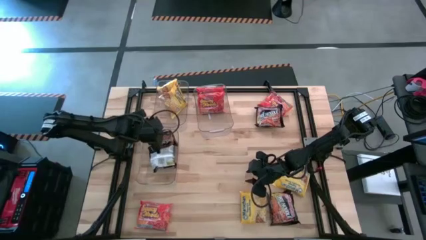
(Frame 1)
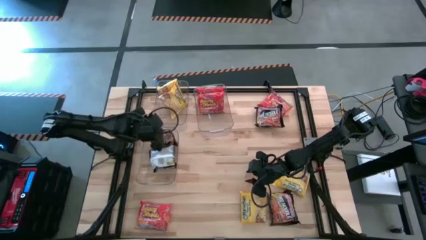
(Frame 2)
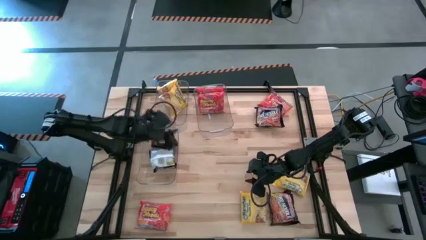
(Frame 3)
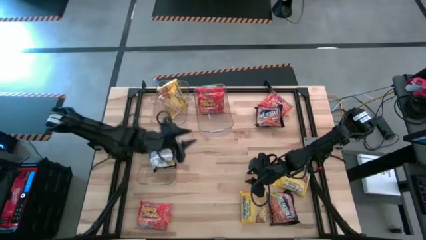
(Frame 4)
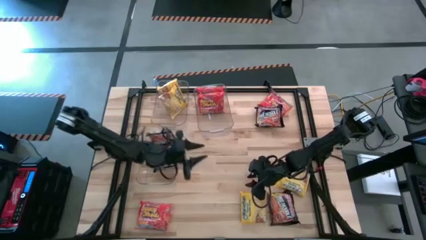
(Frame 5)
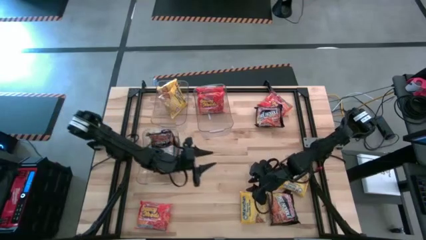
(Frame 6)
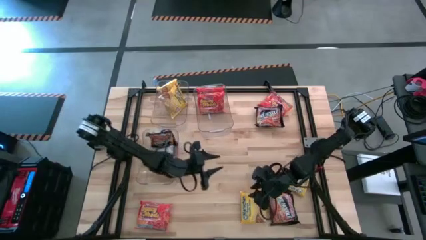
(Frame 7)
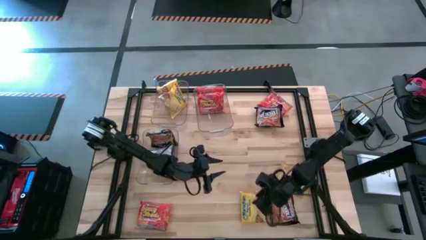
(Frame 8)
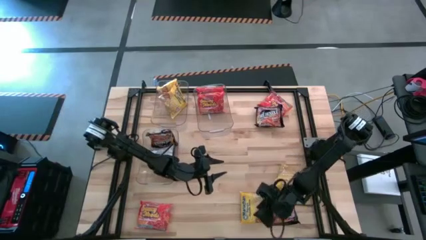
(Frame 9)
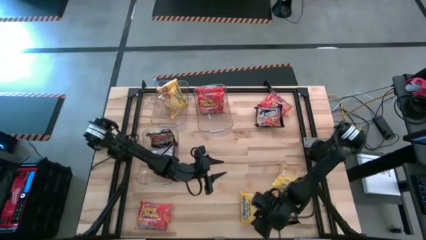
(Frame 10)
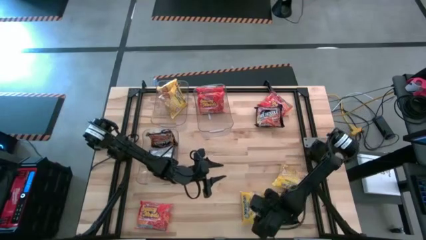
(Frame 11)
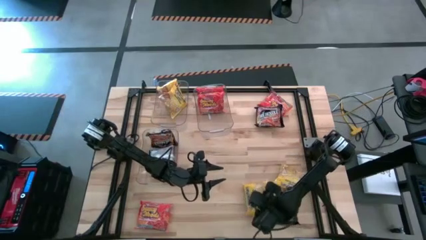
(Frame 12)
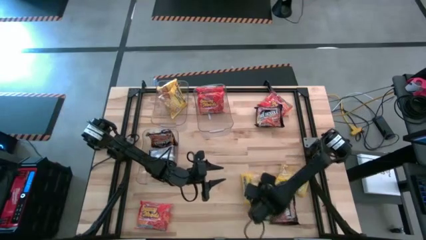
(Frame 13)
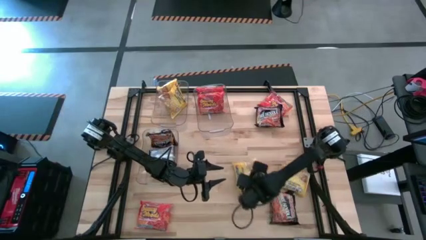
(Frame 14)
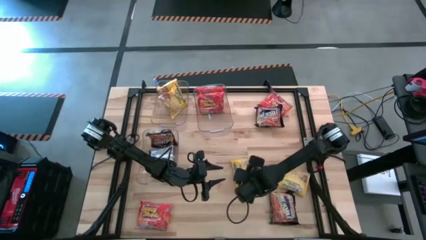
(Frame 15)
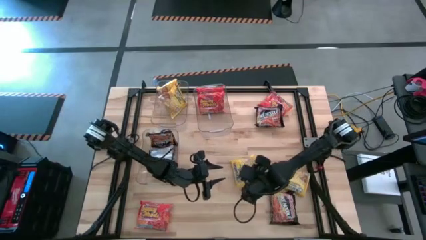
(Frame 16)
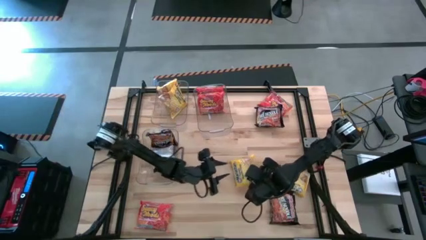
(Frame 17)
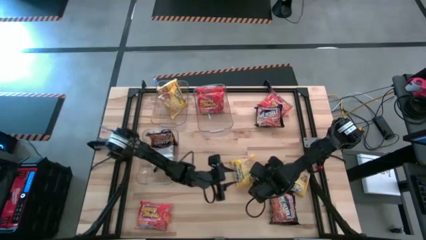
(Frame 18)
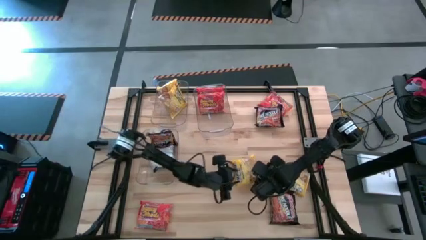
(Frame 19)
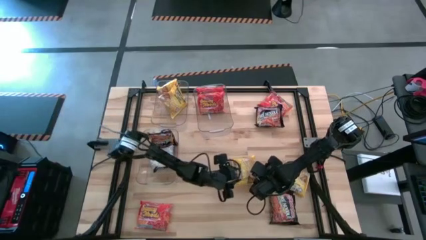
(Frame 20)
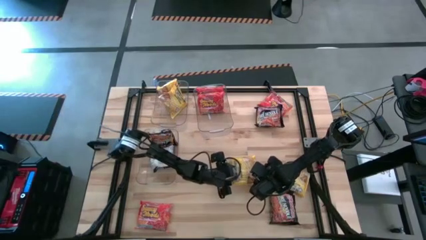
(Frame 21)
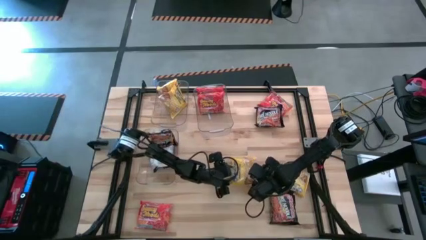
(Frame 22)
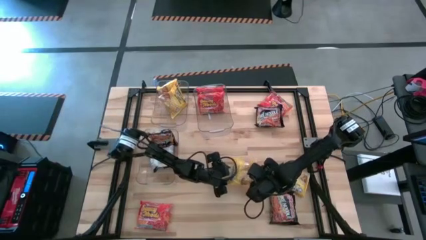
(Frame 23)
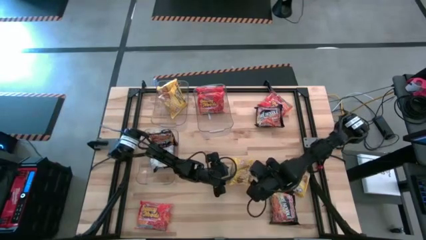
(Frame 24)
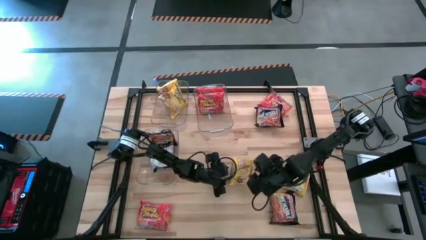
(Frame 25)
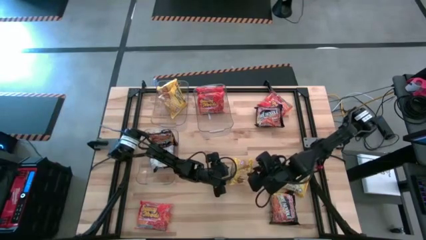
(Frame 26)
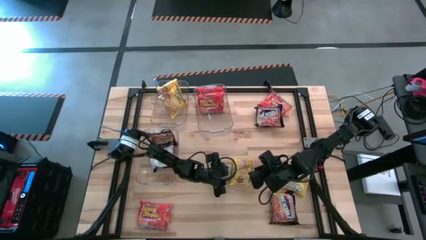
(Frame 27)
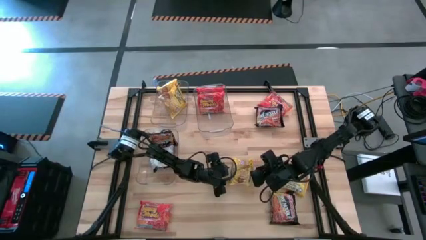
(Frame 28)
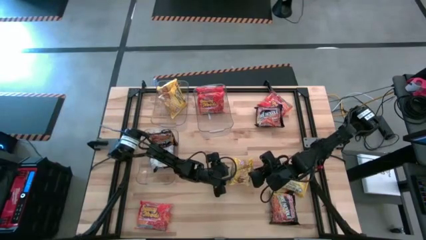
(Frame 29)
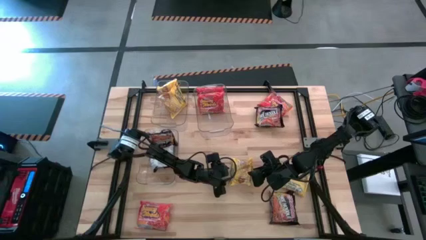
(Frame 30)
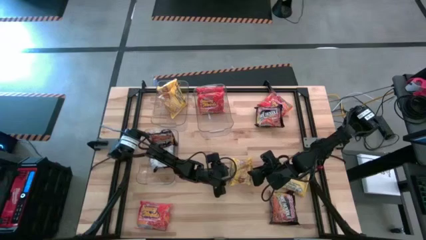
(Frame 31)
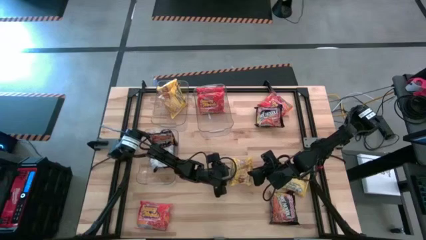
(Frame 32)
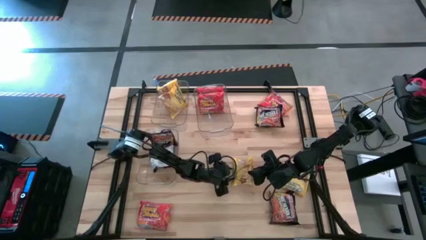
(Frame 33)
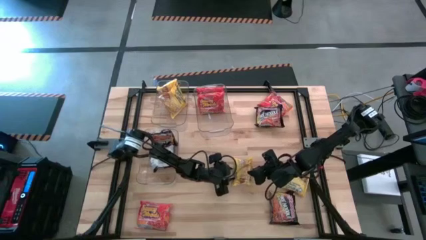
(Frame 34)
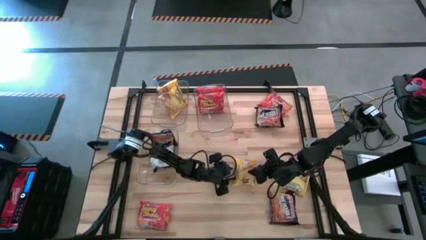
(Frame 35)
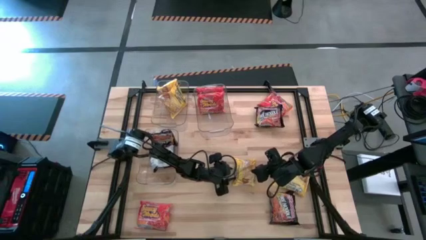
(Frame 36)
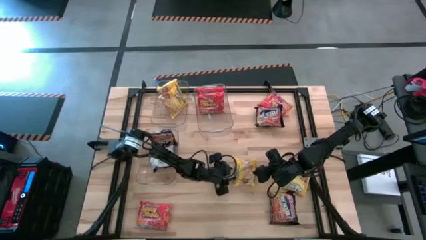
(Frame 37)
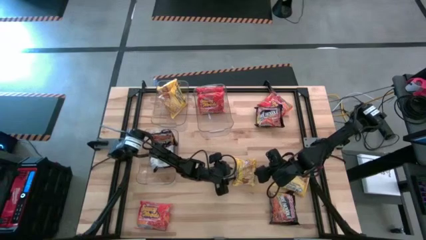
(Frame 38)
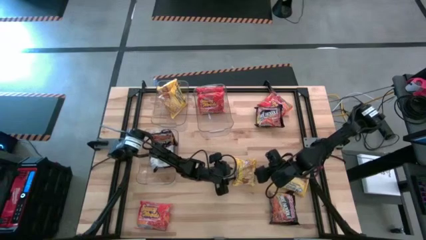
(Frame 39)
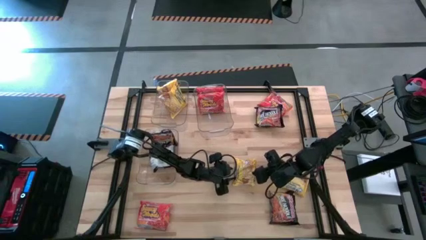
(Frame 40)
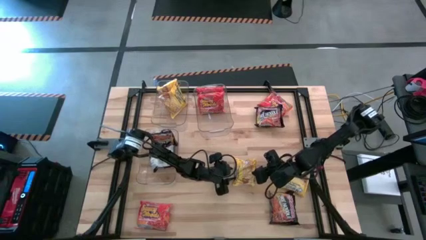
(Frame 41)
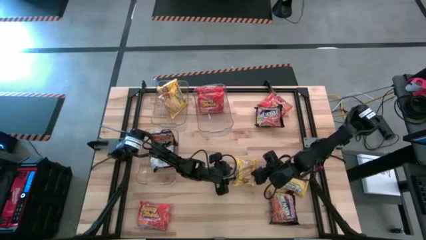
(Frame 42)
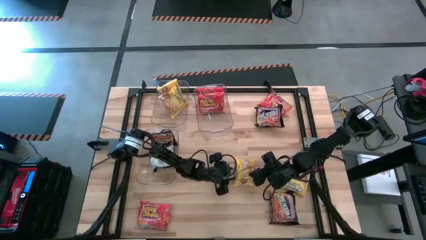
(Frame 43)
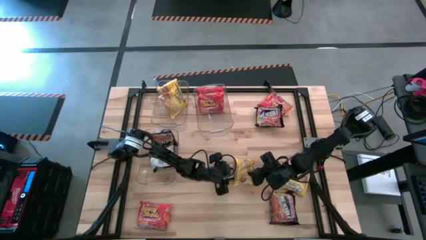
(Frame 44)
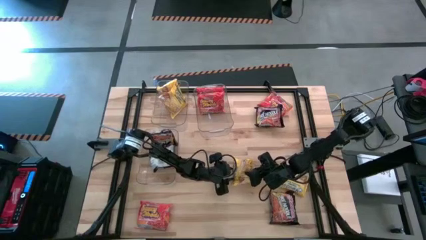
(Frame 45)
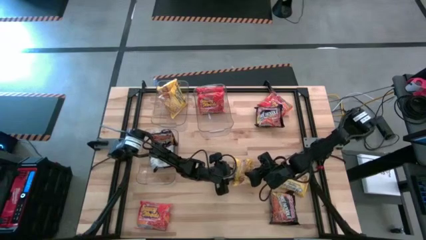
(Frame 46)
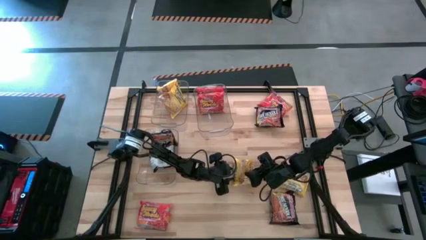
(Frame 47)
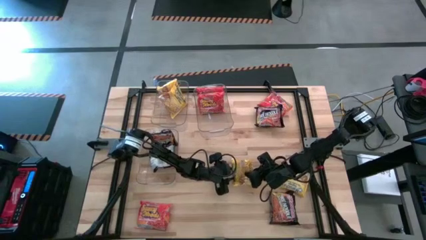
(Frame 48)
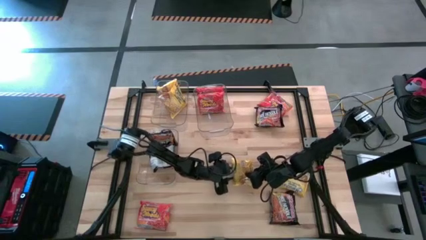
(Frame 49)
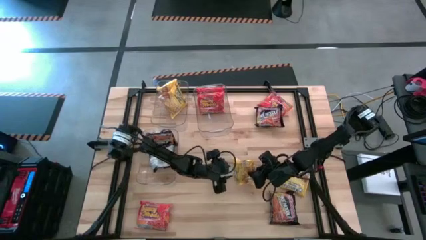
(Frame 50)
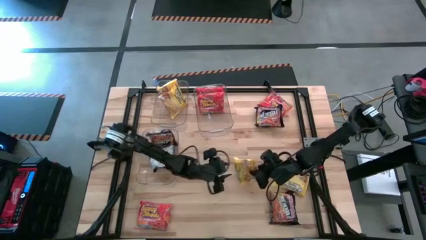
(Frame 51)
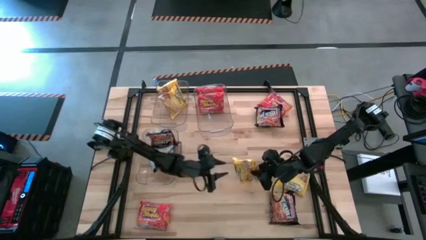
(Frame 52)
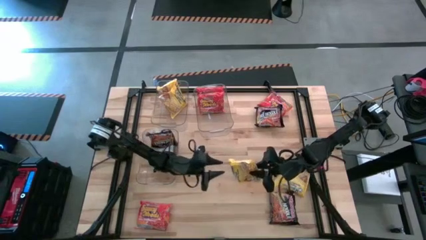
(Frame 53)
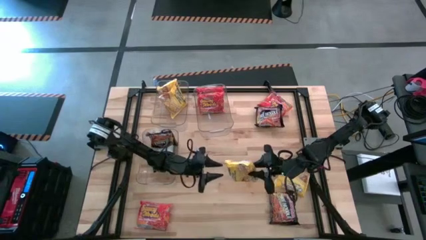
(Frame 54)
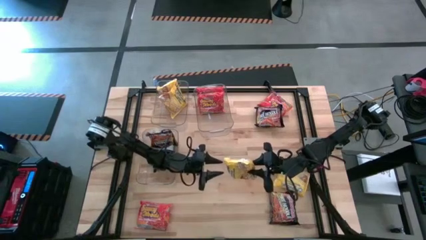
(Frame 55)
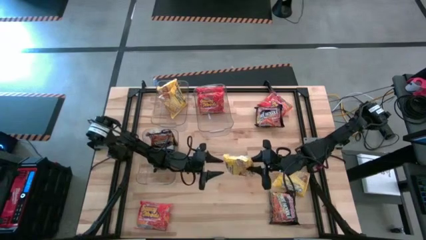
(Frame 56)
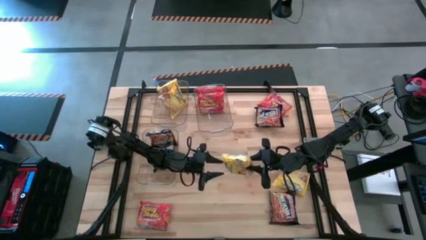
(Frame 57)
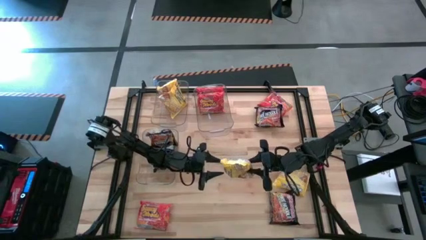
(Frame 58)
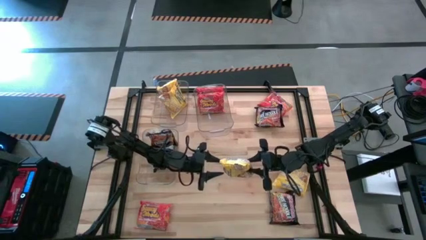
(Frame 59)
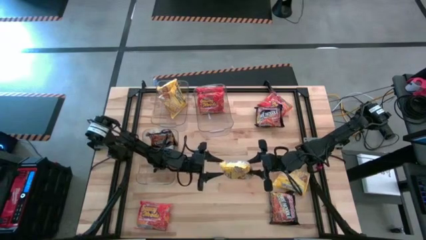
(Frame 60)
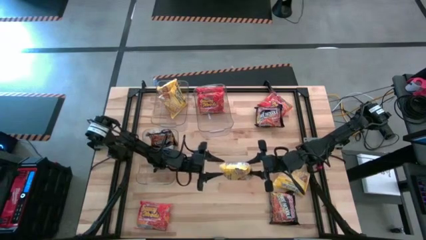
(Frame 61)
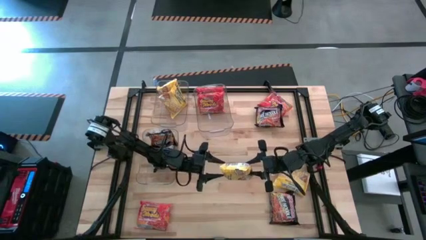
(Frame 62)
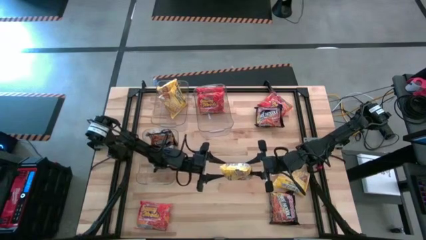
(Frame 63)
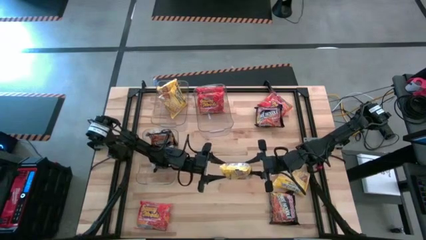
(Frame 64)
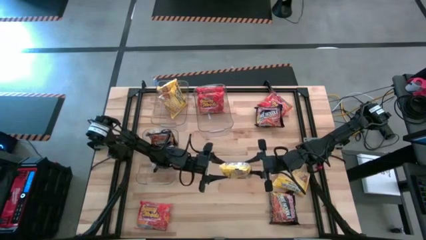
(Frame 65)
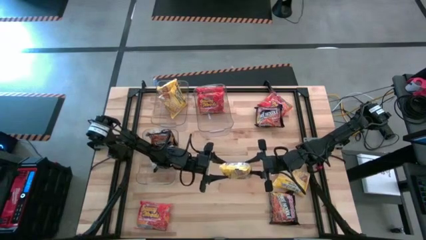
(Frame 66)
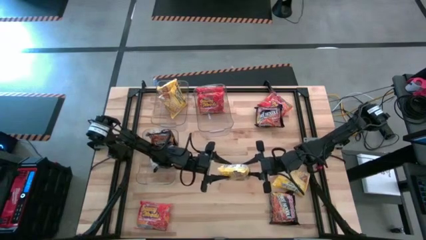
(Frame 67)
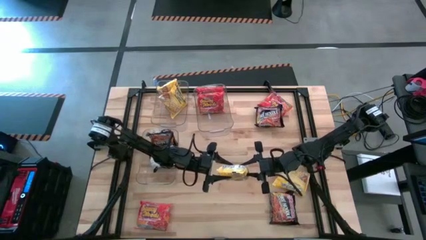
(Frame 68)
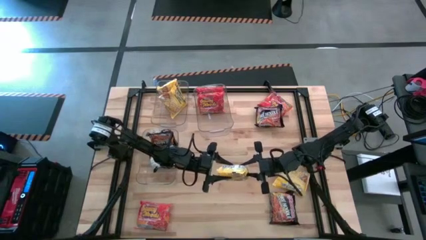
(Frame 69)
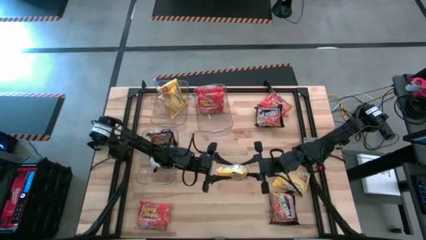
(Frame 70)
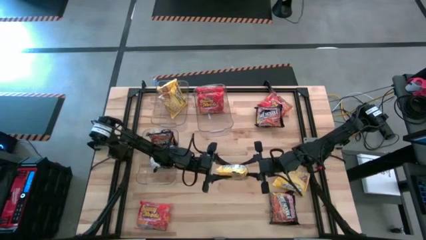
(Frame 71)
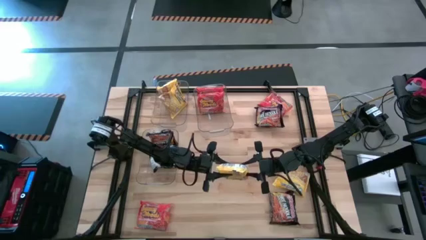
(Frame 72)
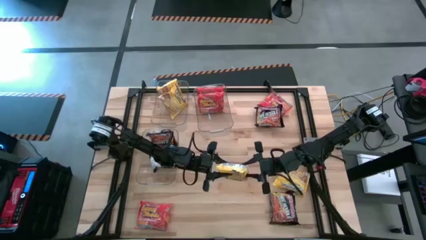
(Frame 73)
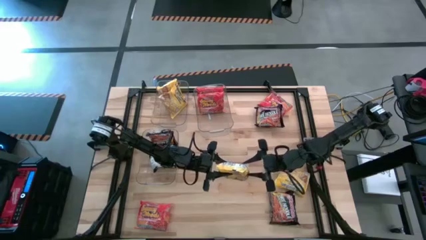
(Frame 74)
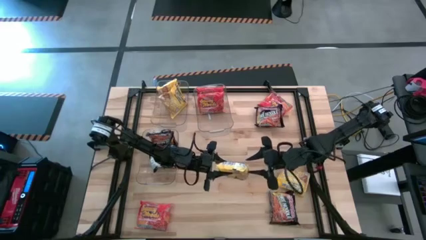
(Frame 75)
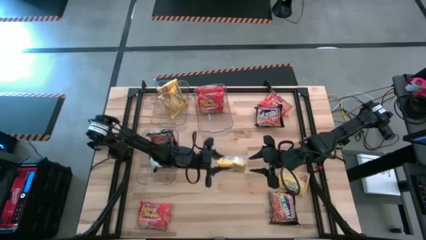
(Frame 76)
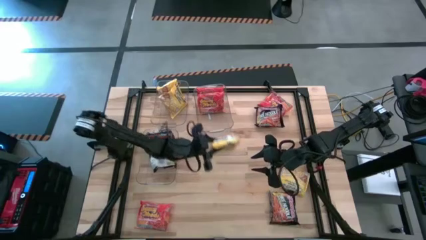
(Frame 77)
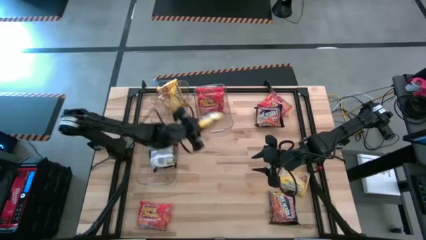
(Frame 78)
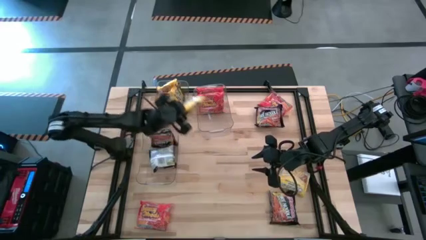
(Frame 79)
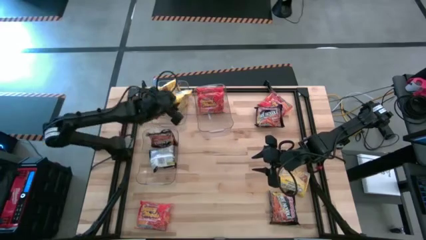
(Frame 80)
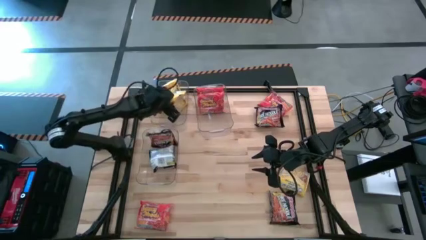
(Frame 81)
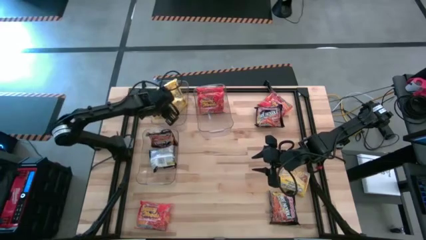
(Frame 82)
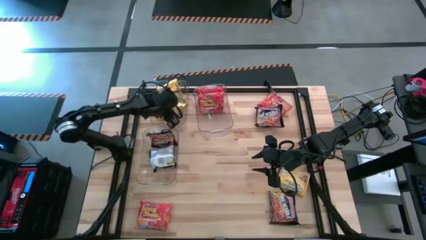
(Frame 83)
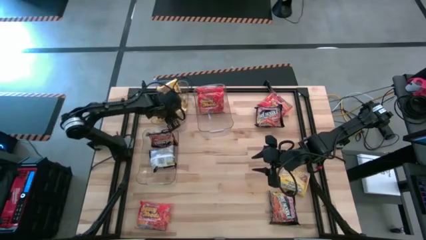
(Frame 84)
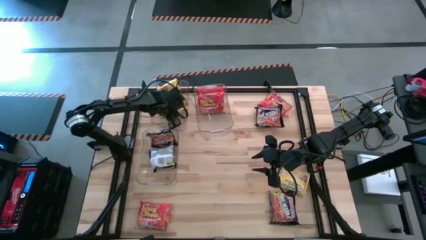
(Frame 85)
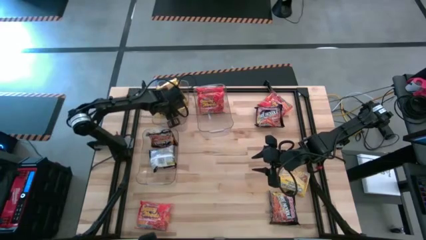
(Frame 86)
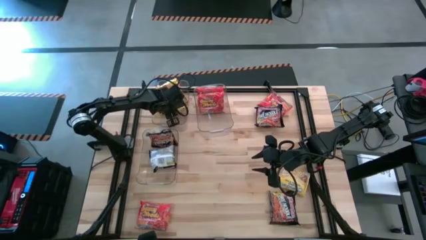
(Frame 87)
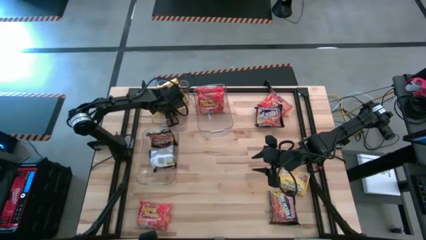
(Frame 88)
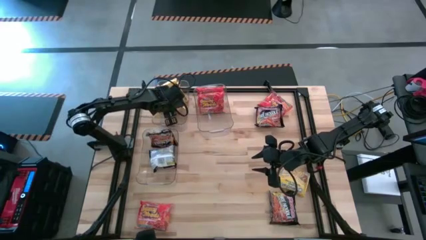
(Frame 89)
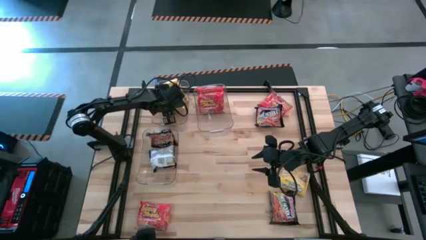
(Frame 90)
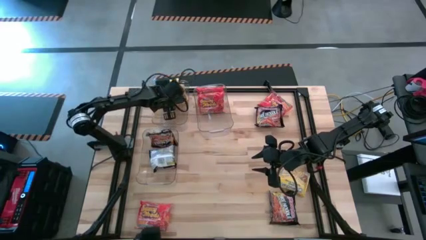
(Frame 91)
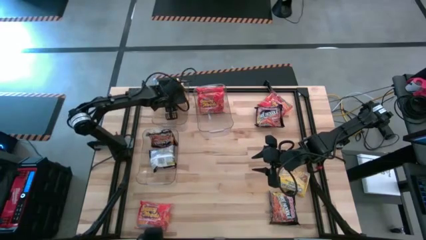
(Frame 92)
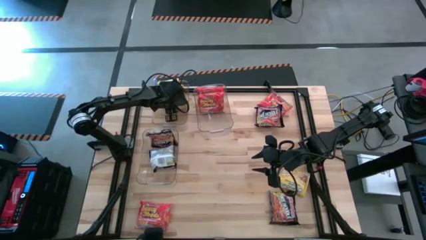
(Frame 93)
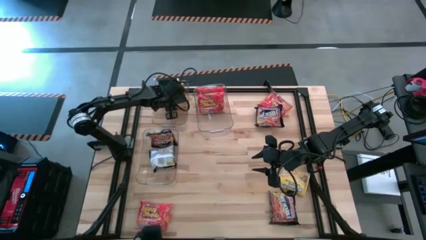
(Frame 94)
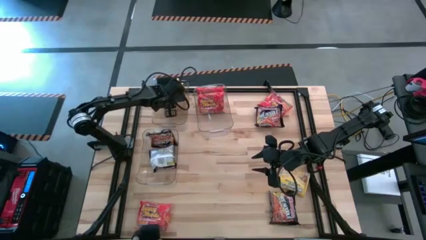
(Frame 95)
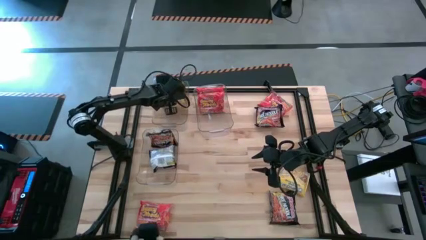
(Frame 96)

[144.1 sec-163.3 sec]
Task: Sort Maruchan noodles
Put the yellow noodle pack into the top left transparent bin
